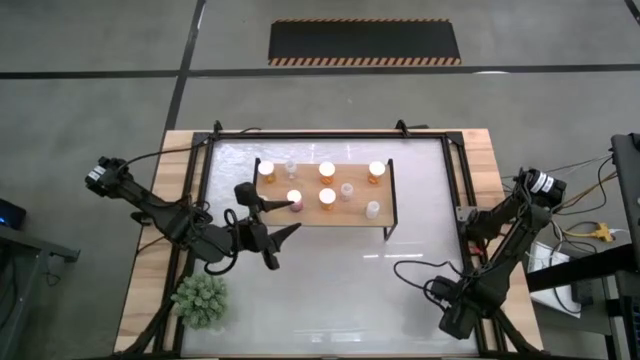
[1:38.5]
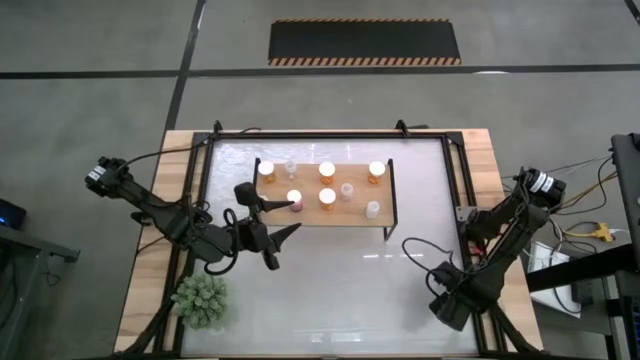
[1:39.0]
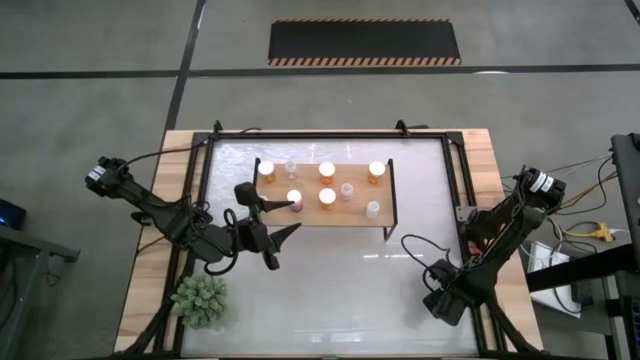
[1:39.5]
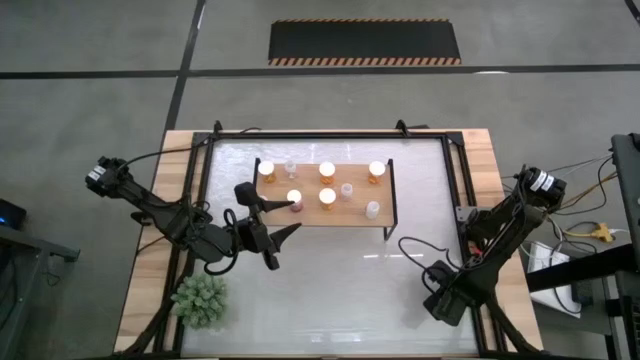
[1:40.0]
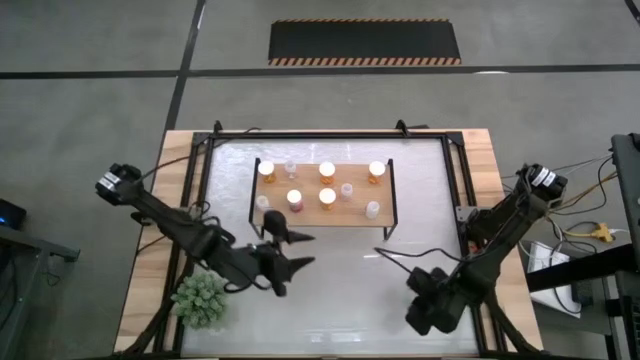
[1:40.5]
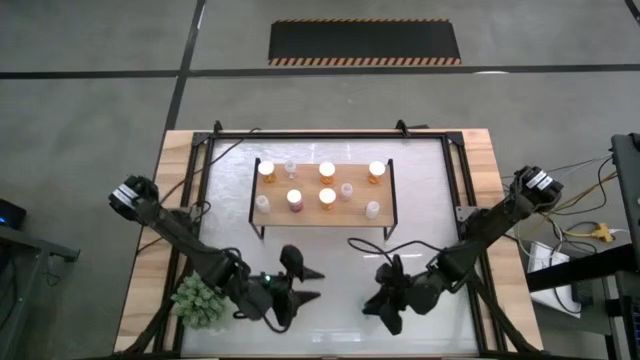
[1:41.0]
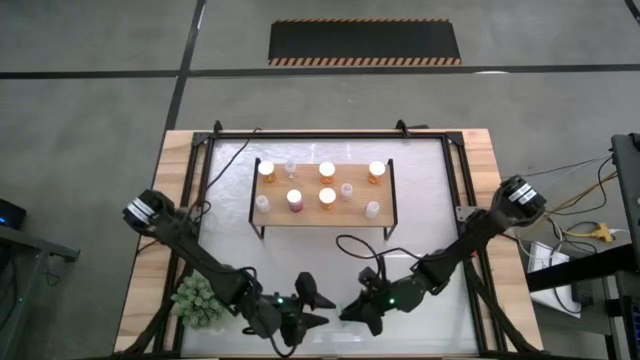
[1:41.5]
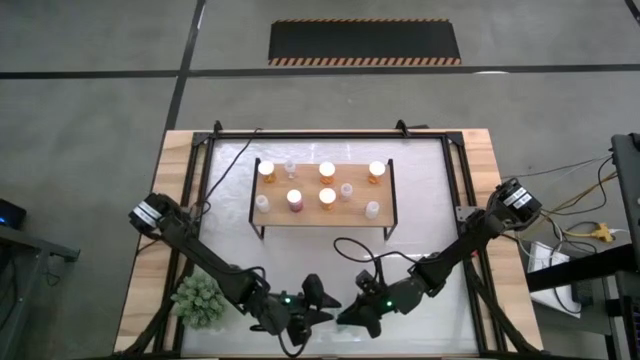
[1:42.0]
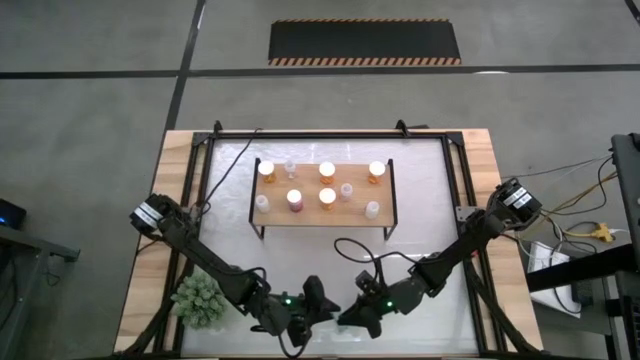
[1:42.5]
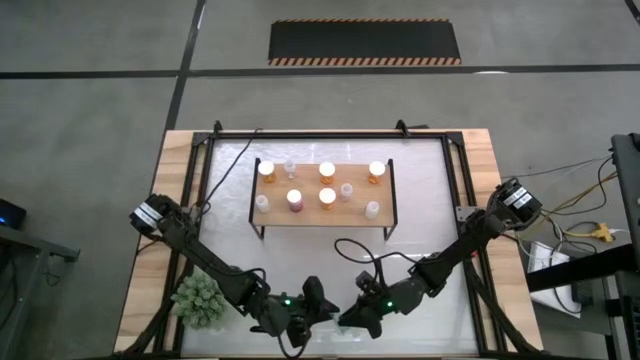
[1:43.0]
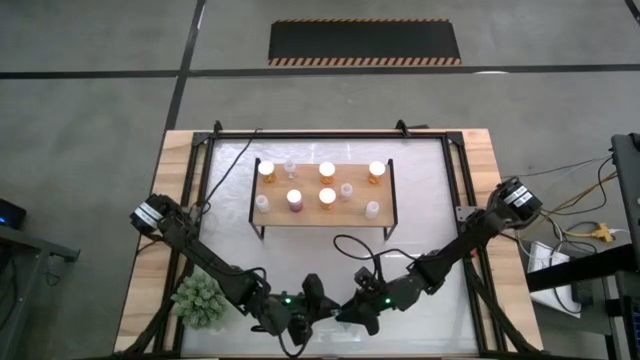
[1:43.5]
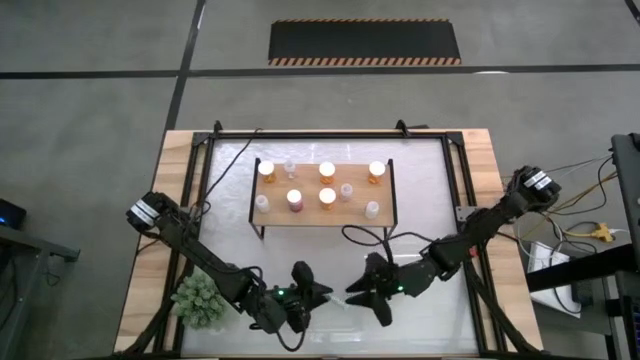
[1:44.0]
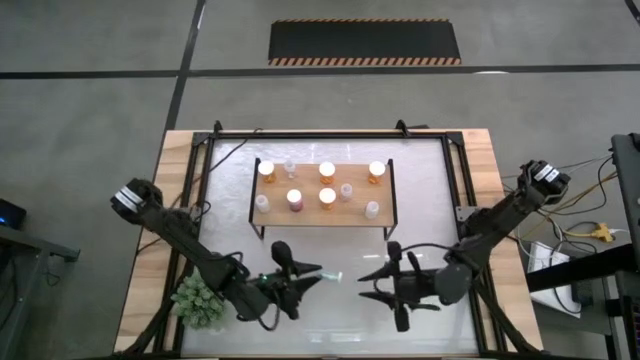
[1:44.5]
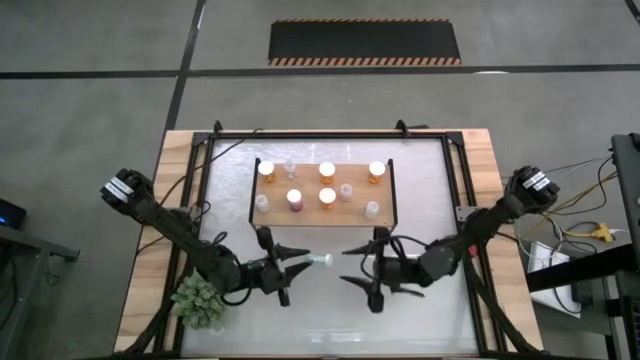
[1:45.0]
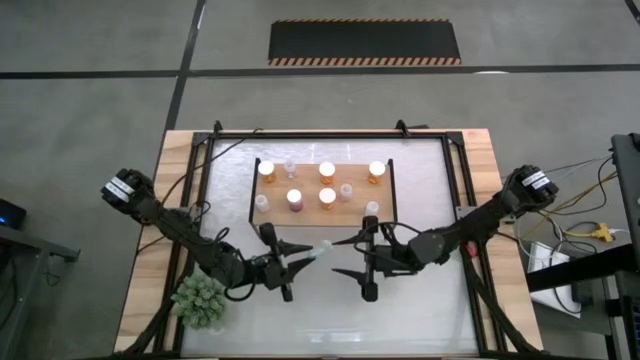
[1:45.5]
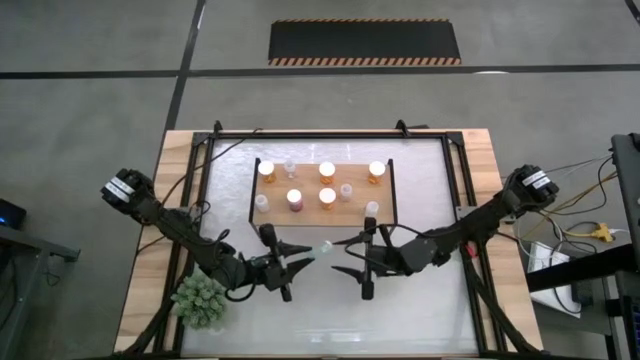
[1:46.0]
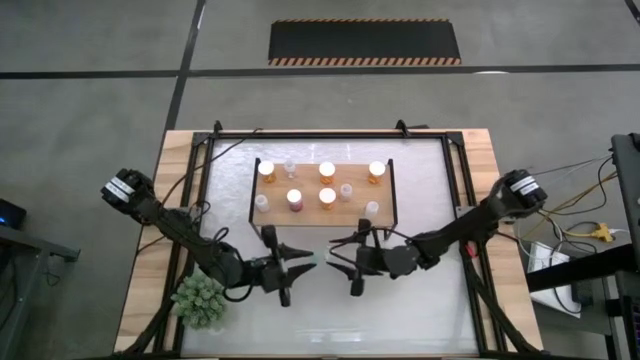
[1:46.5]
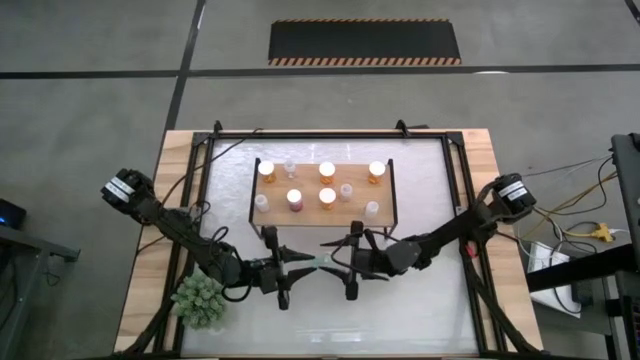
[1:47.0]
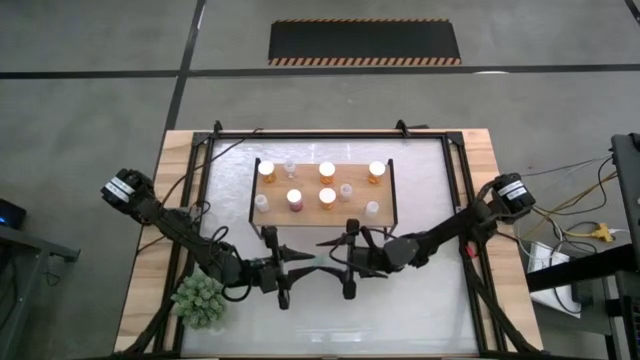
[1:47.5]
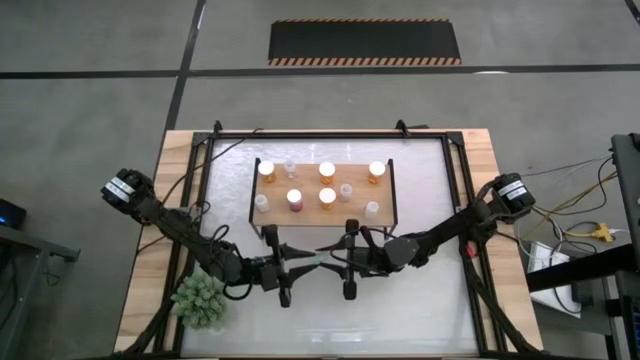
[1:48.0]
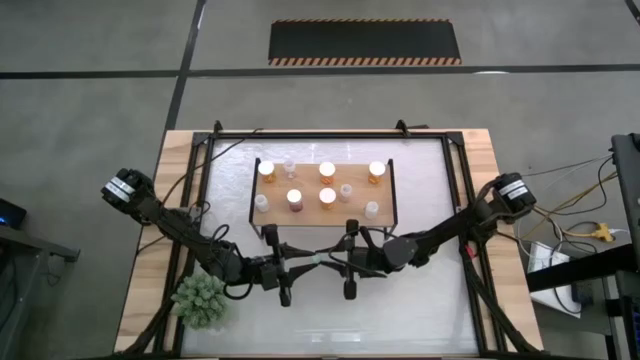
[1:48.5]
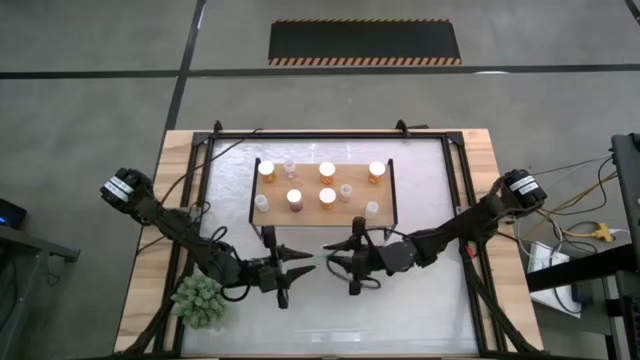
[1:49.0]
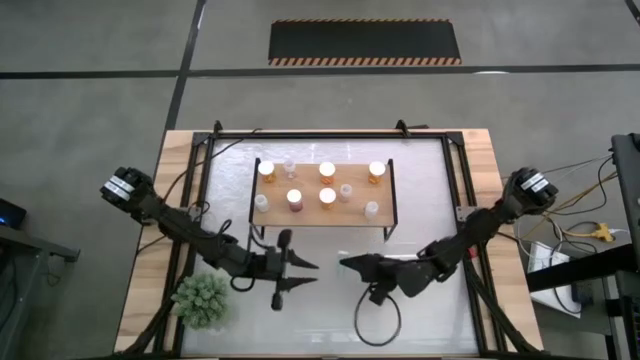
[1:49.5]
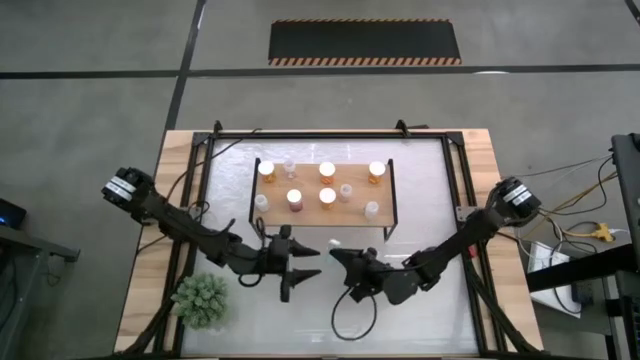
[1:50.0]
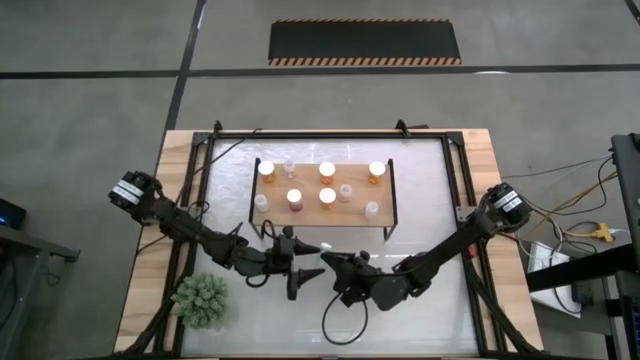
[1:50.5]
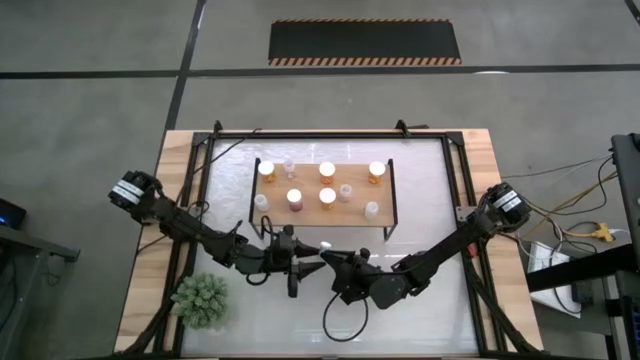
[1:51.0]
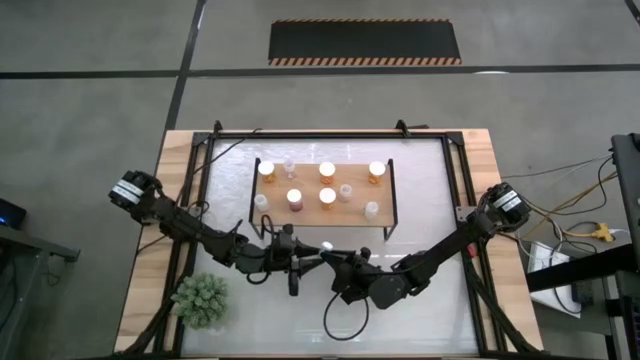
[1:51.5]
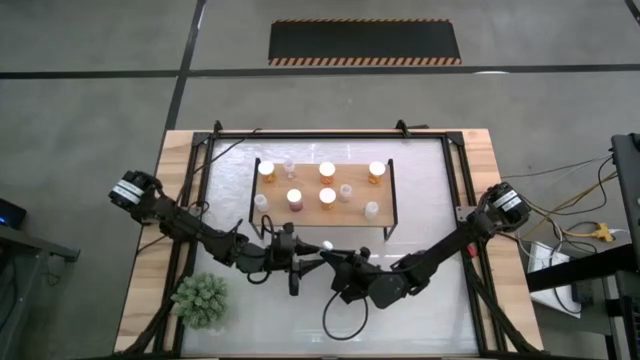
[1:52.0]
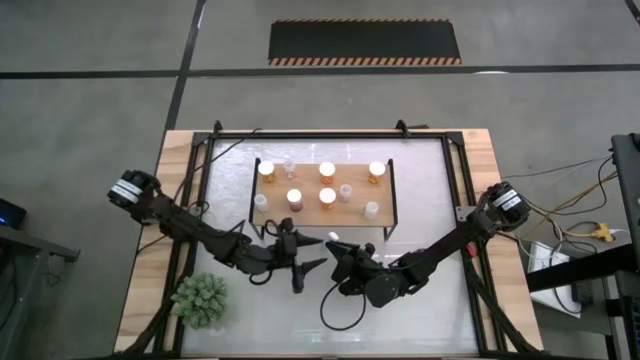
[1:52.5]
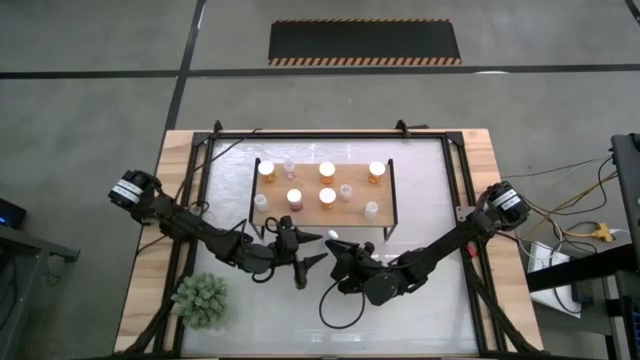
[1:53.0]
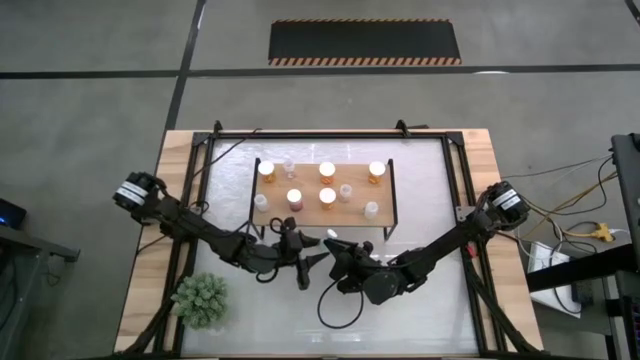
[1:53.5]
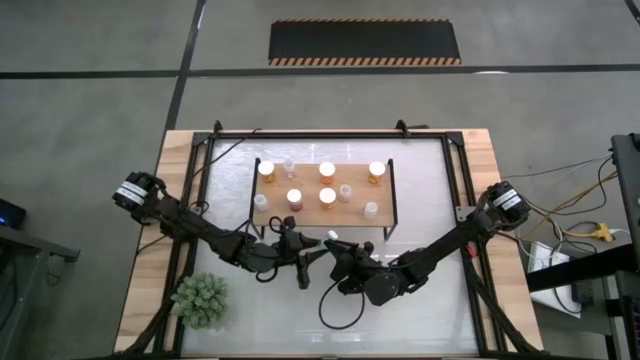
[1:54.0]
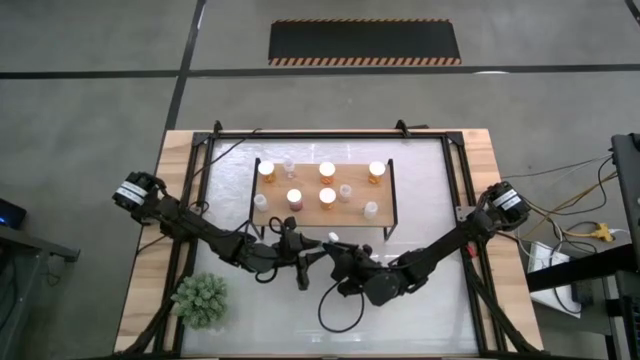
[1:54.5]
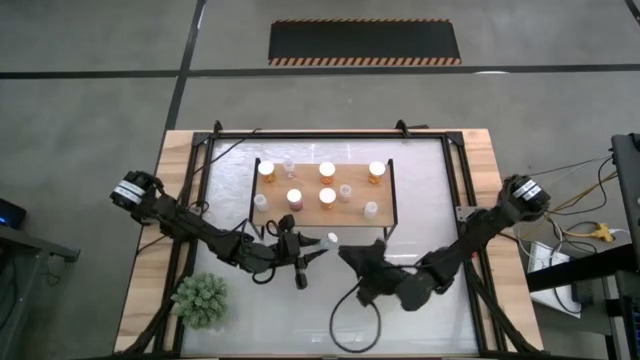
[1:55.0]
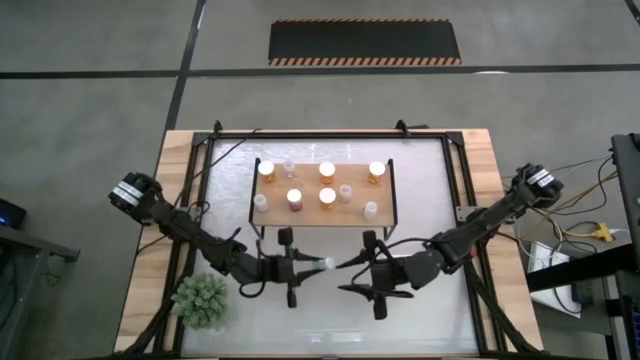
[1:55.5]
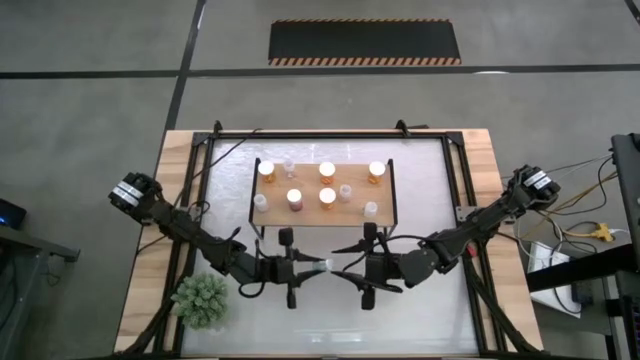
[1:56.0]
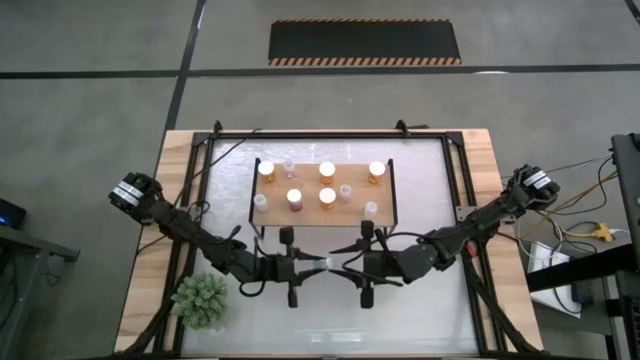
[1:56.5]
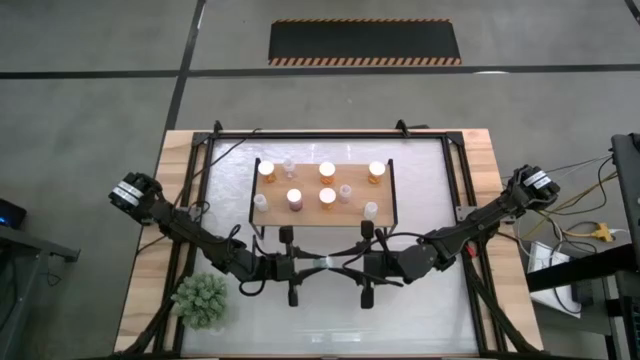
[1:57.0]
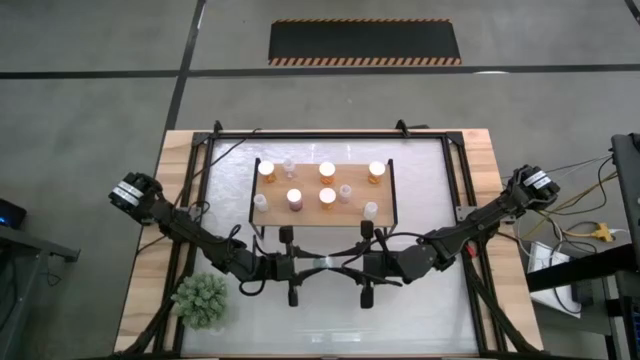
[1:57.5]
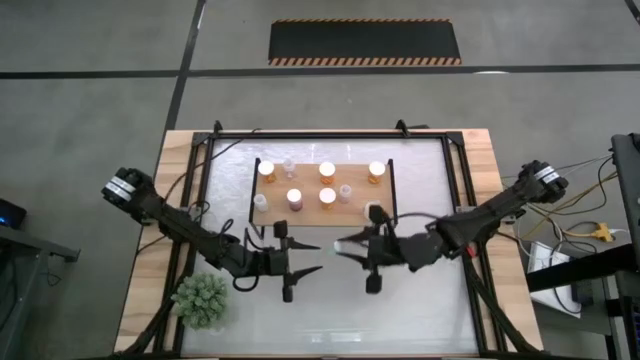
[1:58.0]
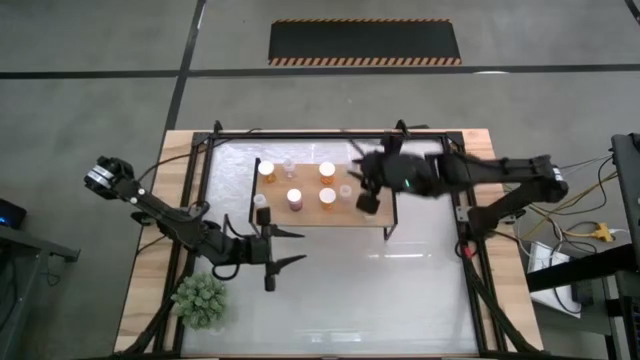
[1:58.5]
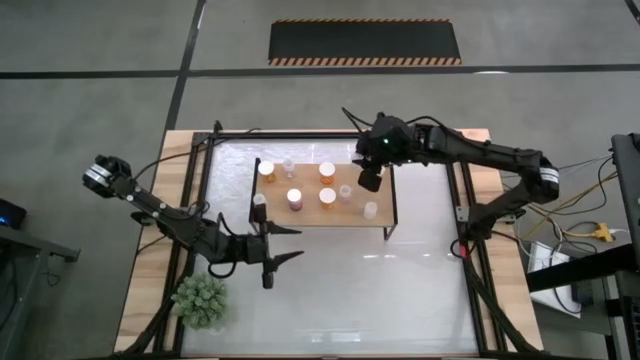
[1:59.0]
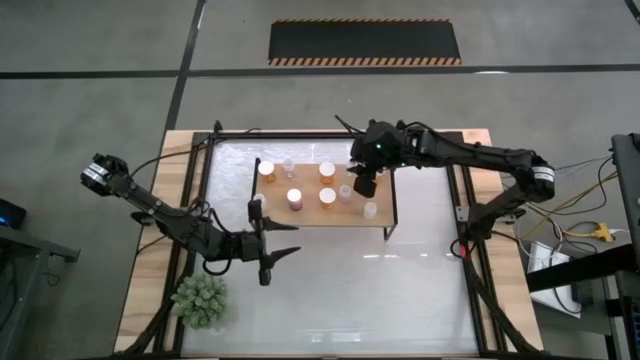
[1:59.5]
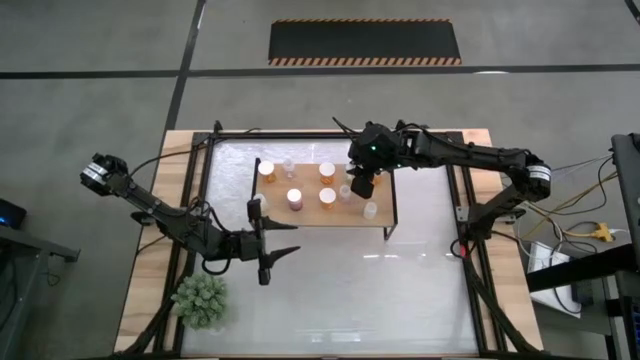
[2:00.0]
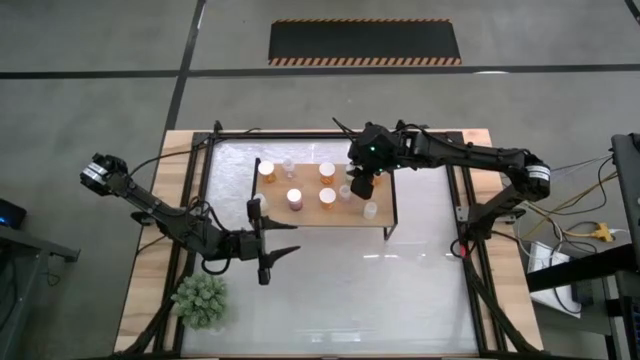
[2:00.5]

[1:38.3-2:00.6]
Task: Pick and place medicine bottles onto shelf by color
Put the green pill bottle on the shelf
